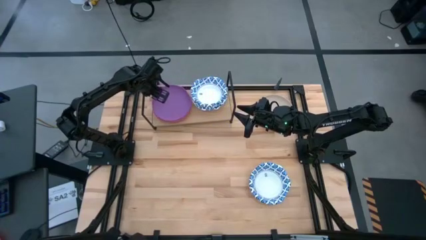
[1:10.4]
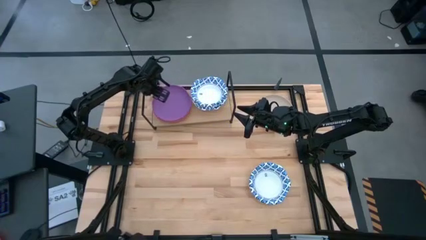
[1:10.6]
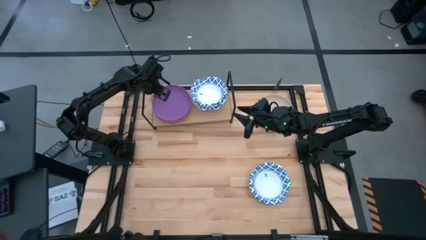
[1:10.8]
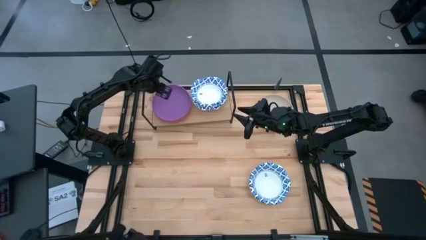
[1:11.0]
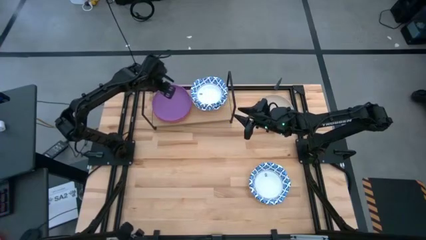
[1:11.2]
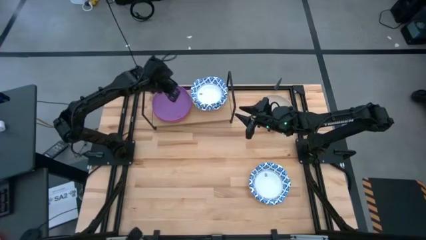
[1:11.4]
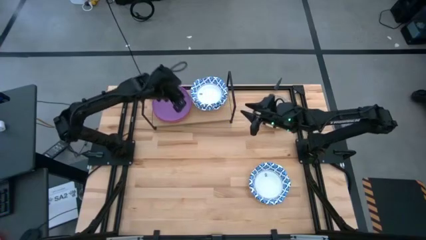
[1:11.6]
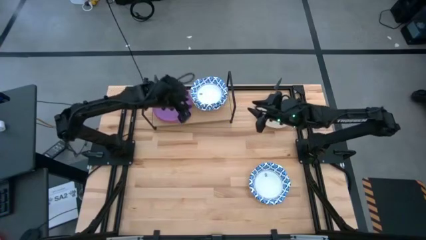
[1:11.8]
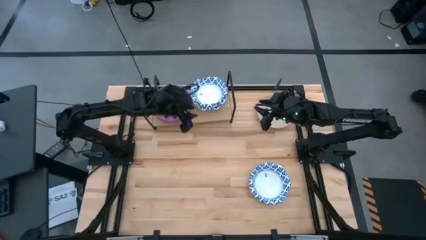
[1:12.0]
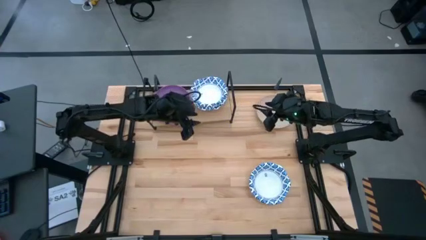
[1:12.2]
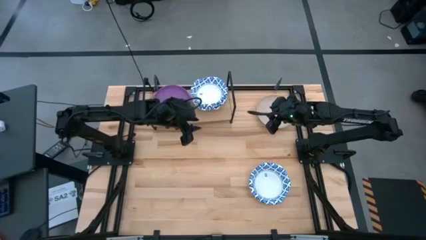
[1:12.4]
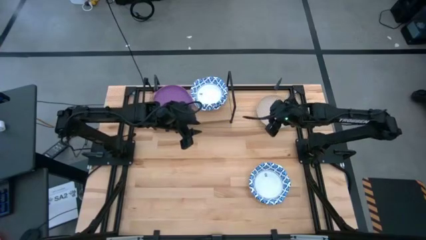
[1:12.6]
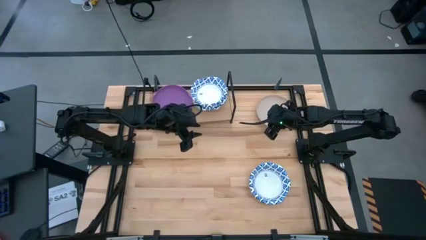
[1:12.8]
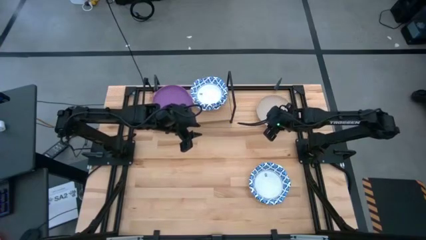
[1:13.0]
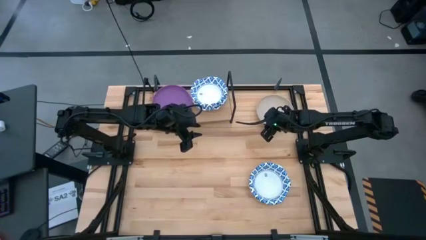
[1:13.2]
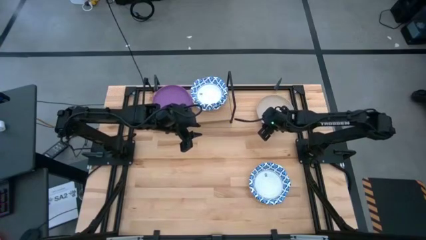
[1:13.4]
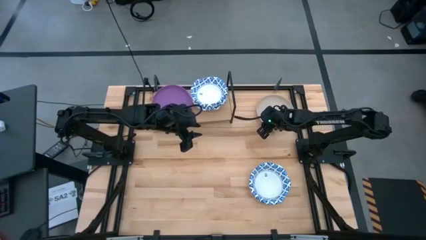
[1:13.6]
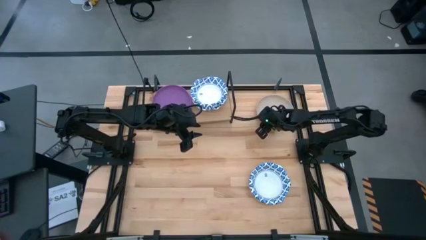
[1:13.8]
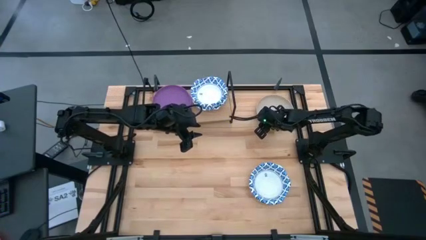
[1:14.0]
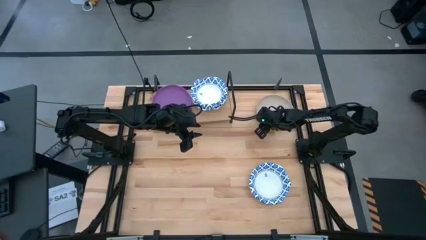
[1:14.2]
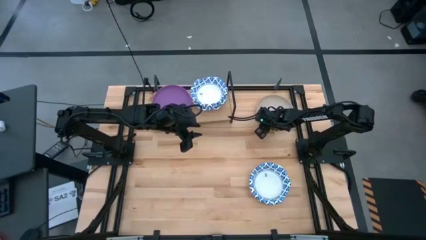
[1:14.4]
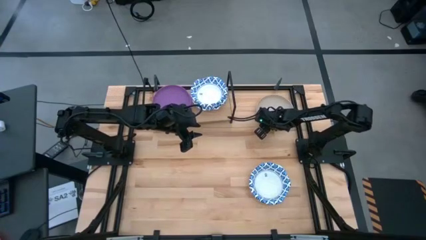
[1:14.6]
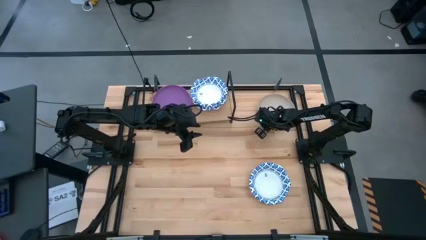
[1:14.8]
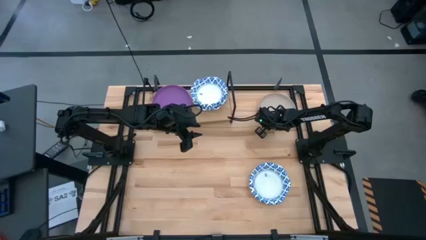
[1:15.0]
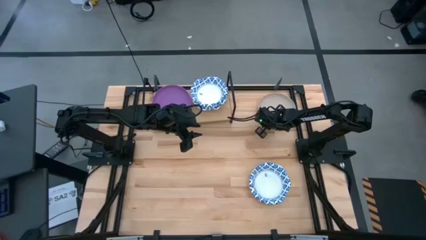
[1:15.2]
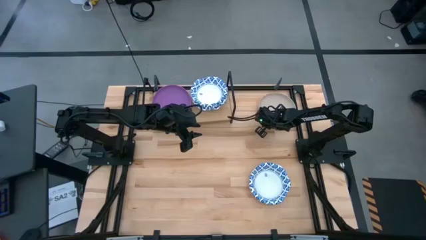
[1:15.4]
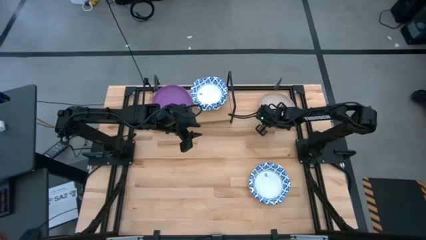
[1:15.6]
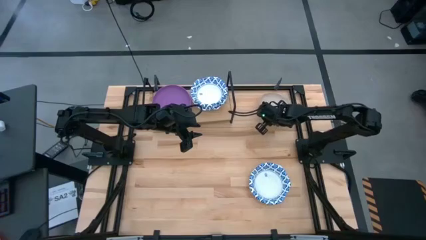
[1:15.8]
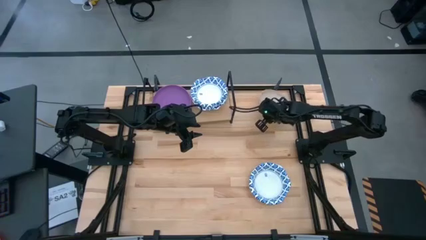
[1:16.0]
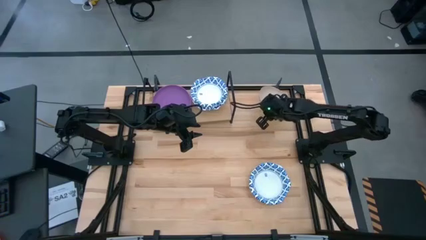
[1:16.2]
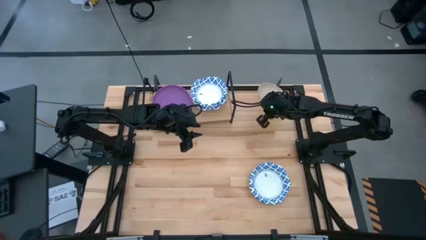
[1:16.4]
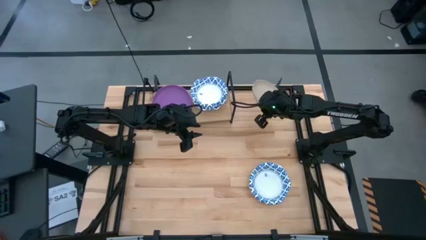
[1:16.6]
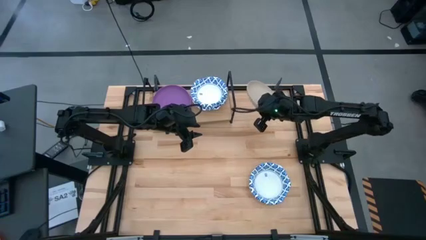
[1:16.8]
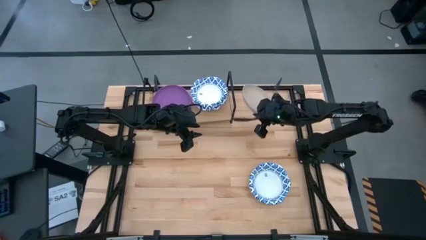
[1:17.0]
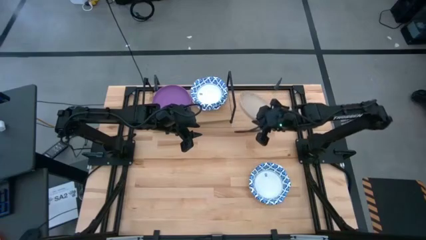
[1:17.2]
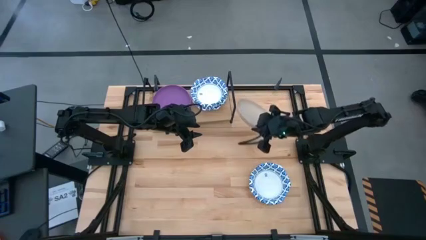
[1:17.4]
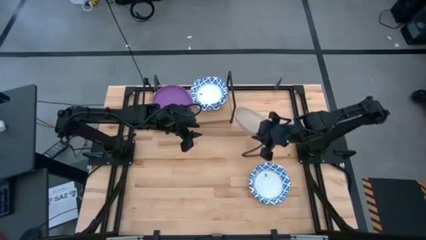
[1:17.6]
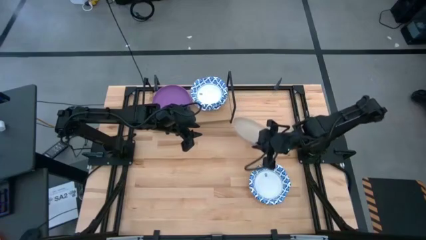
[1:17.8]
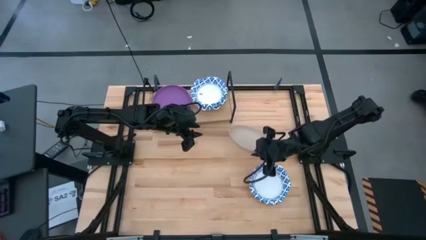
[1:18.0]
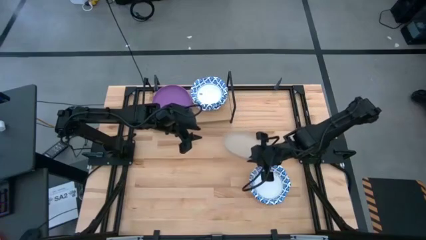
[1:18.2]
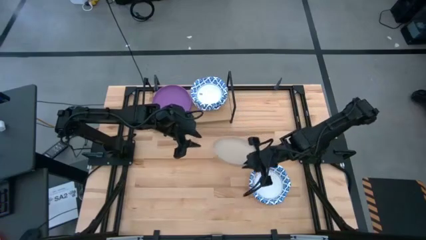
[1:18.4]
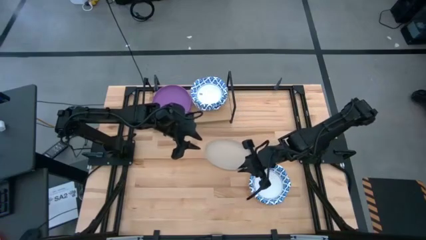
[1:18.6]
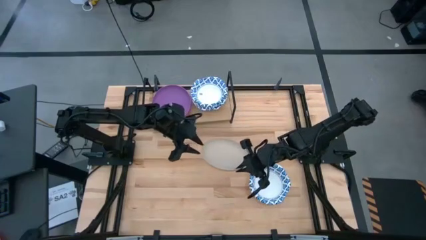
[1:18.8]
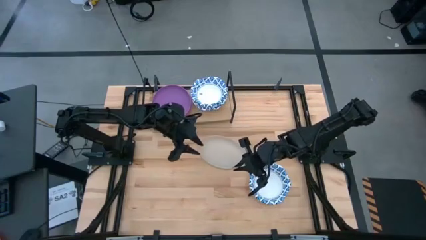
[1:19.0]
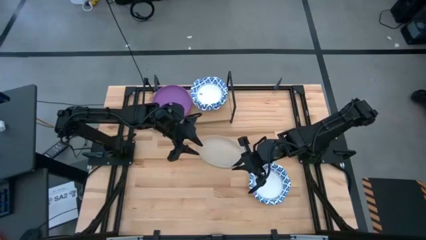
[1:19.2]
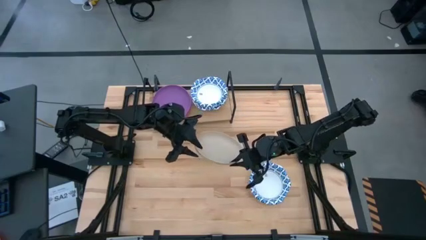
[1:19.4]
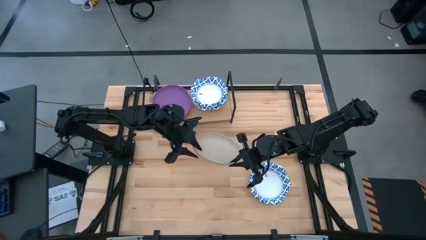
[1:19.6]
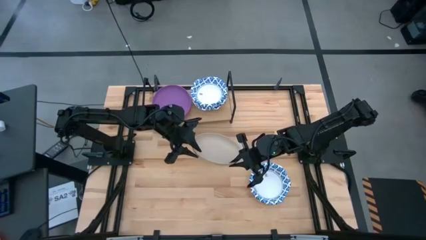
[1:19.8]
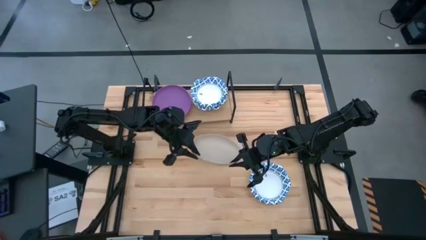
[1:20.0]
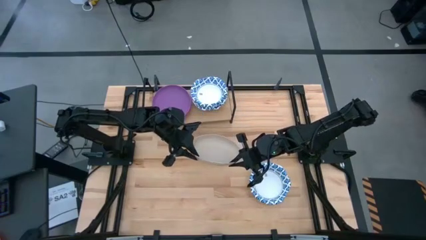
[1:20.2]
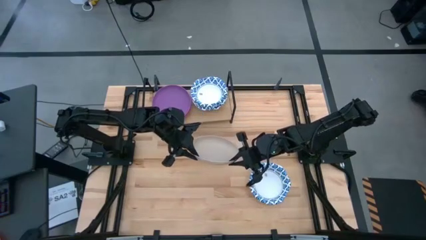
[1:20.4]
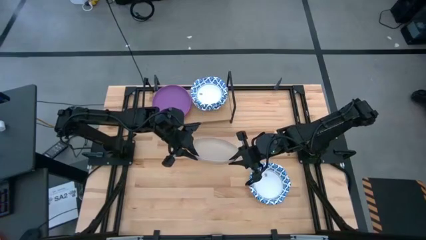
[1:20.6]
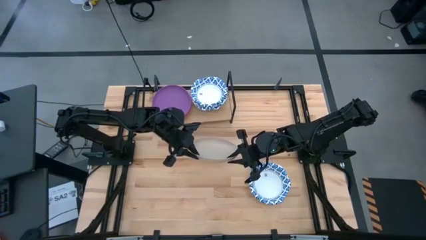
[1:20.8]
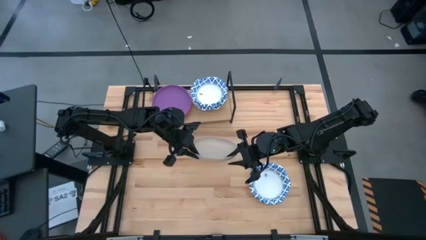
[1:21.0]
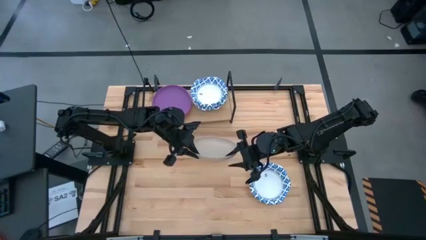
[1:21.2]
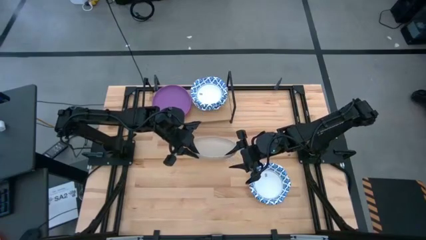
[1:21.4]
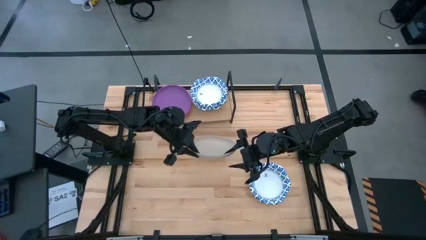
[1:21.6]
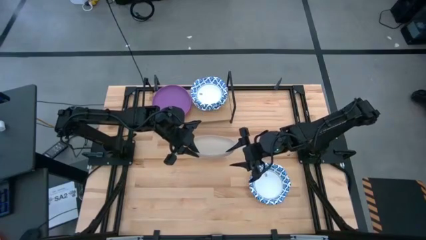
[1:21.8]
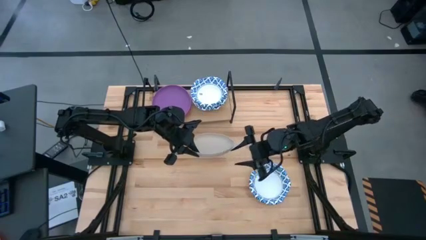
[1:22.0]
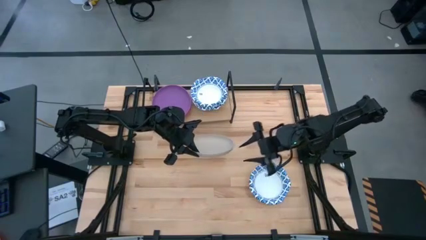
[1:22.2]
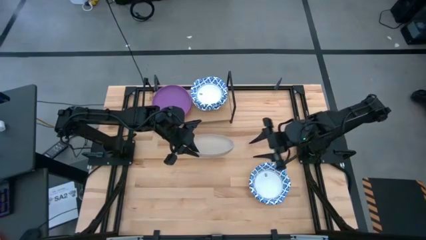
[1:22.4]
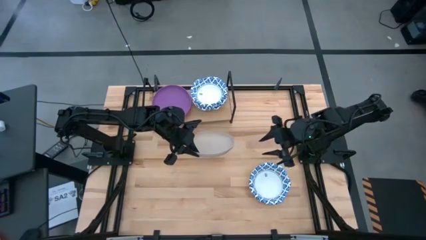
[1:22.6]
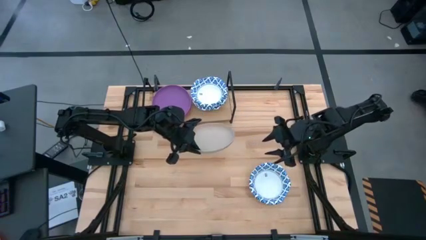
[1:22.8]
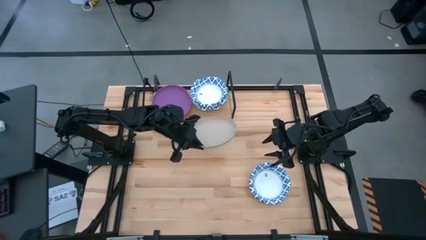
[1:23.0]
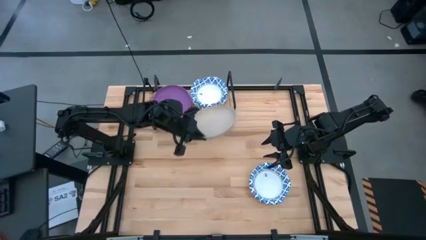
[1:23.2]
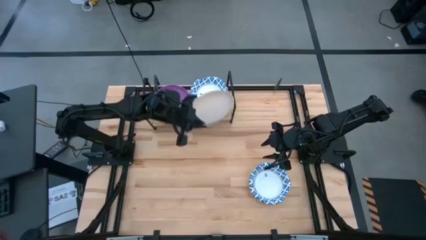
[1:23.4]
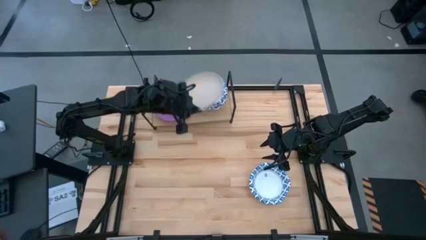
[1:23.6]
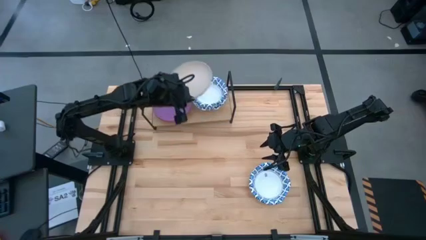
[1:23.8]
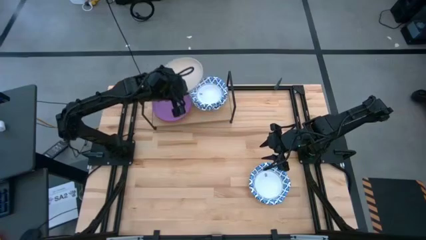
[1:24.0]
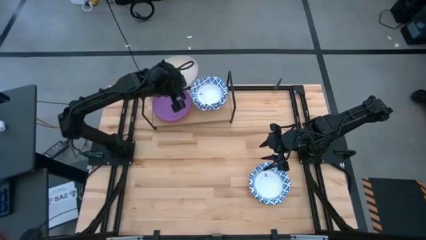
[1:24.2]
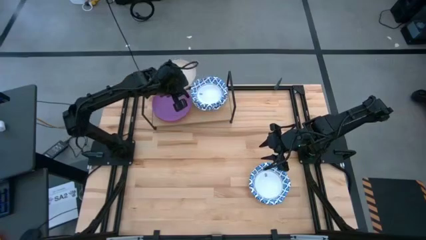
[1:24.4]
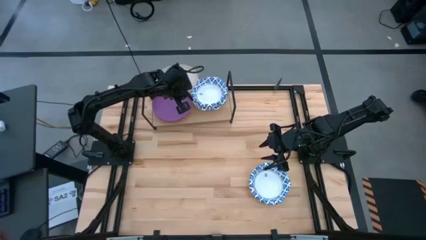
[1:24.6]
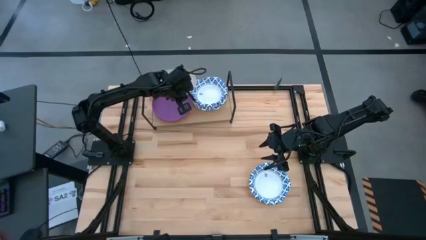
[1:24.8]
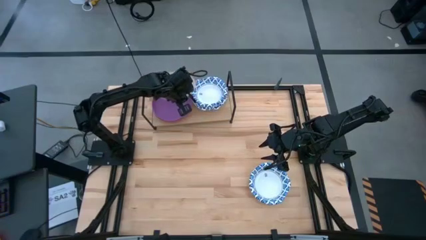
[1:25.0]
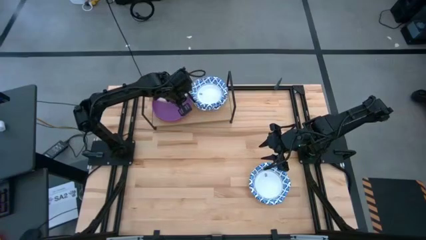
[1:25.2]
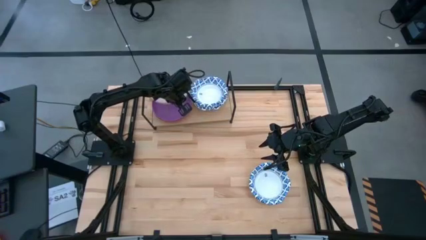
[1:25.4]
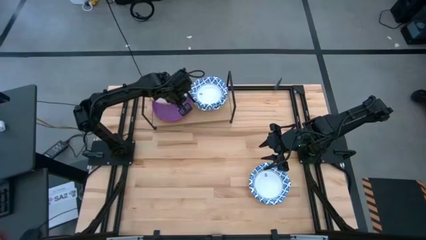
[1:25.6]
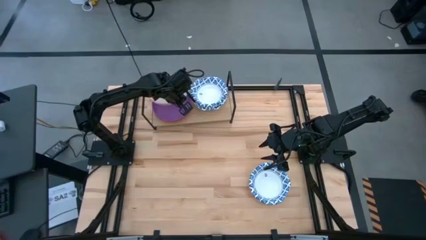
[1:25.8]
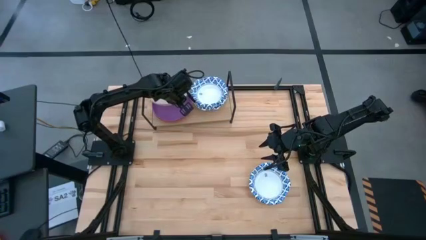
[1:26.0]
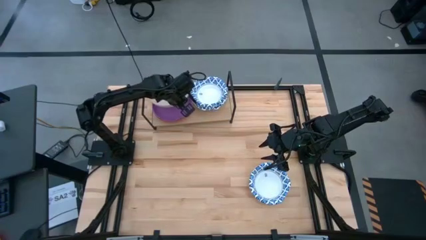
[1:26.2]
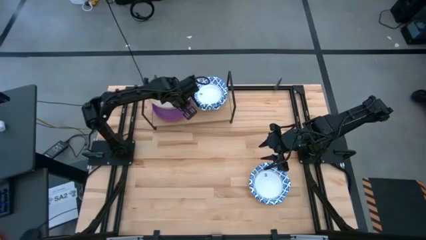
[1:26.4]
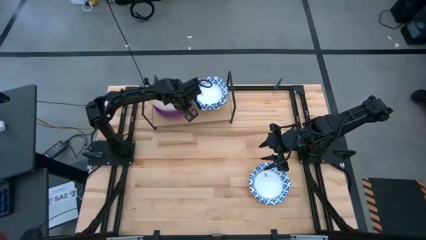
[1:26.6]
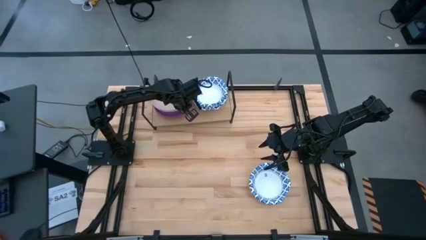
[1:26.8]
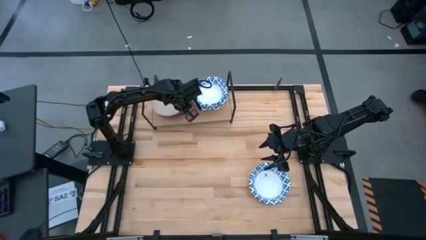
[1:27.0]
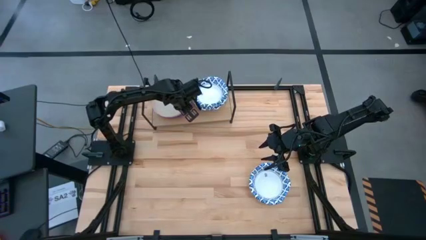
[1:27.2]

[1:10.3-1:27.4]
Task: Place and stack plates onto a shelf
Stack the gray plate on top of the violet plate on the shelf
